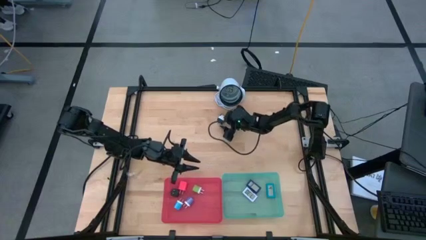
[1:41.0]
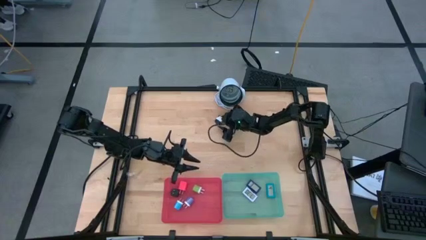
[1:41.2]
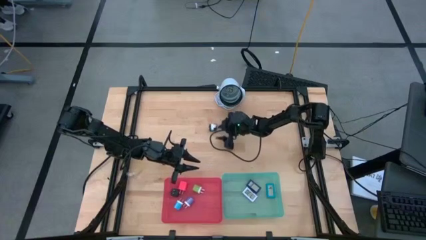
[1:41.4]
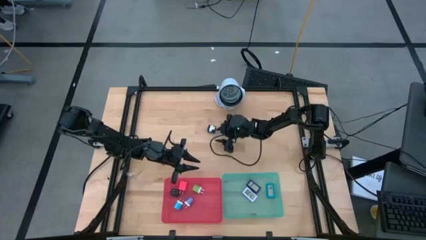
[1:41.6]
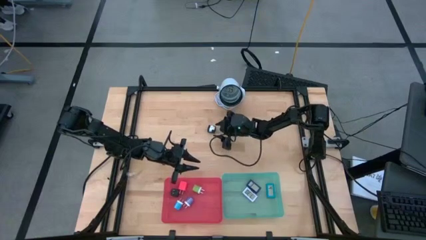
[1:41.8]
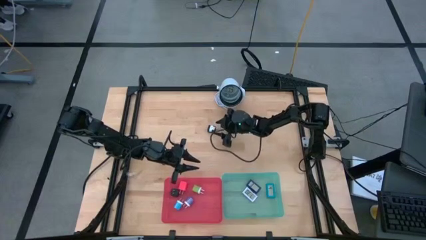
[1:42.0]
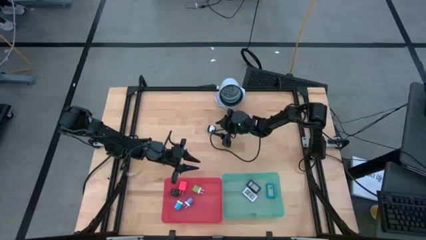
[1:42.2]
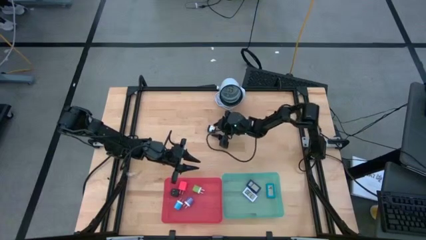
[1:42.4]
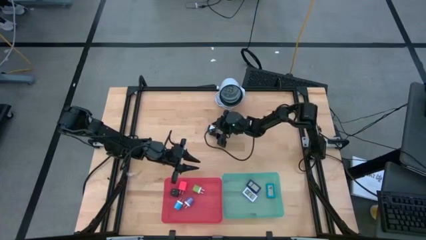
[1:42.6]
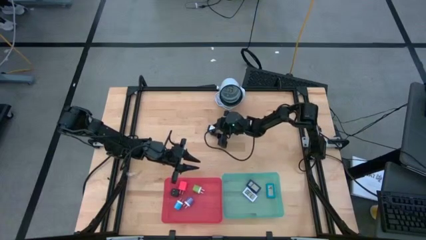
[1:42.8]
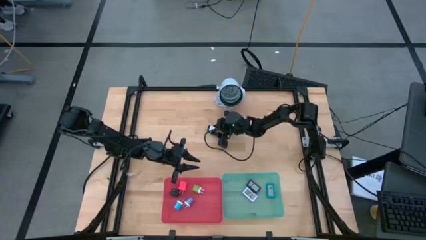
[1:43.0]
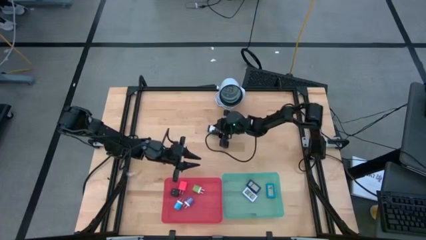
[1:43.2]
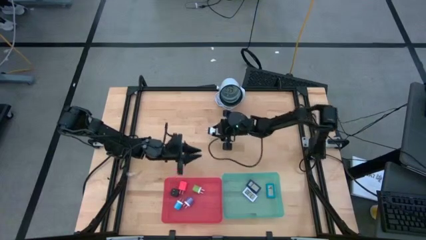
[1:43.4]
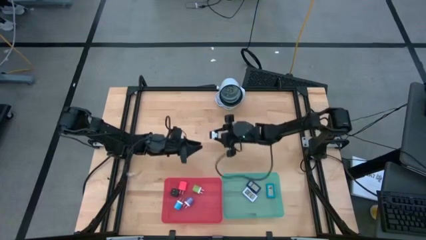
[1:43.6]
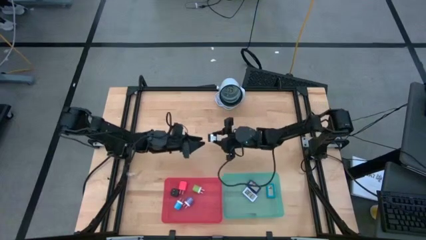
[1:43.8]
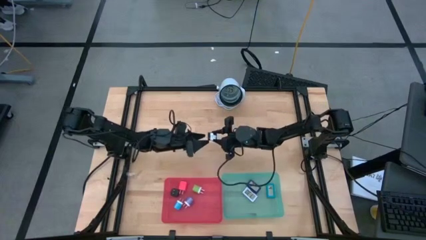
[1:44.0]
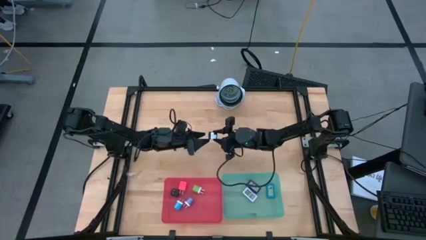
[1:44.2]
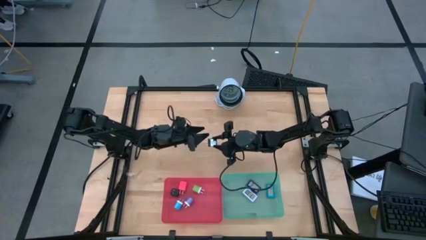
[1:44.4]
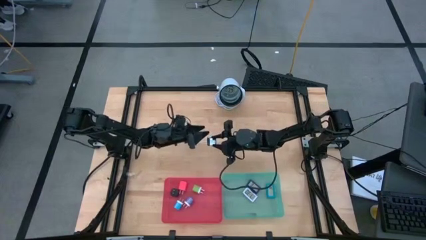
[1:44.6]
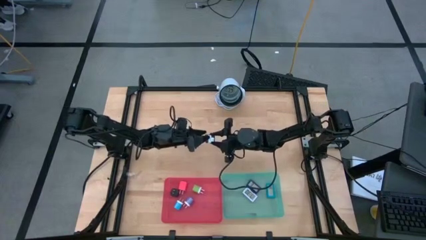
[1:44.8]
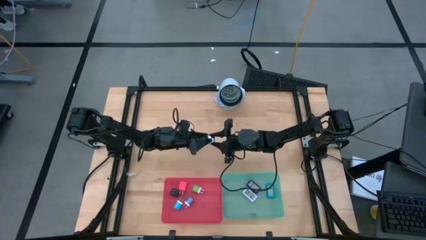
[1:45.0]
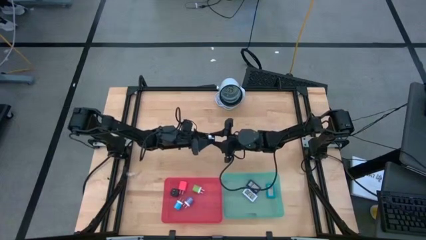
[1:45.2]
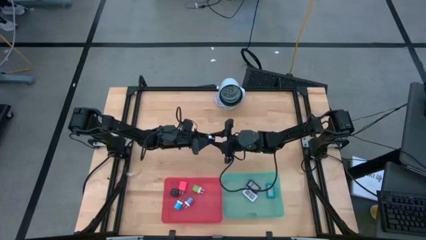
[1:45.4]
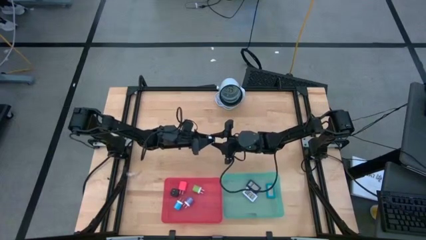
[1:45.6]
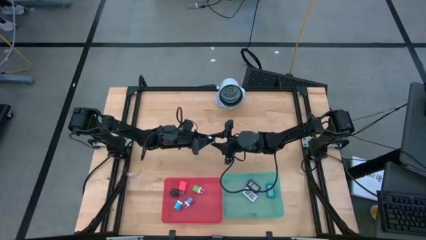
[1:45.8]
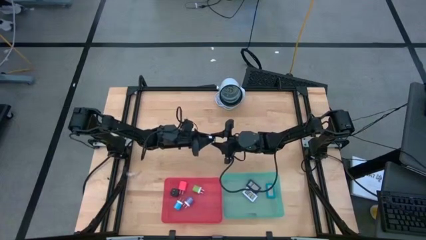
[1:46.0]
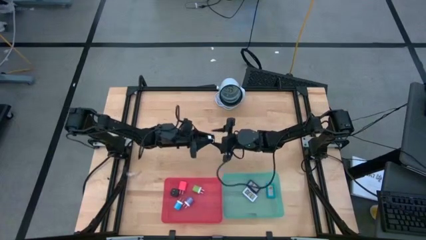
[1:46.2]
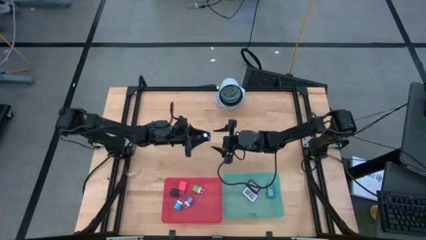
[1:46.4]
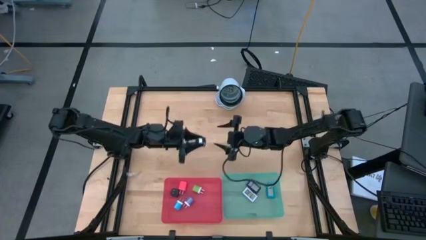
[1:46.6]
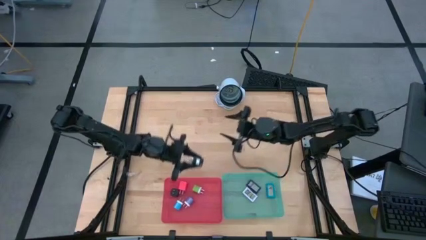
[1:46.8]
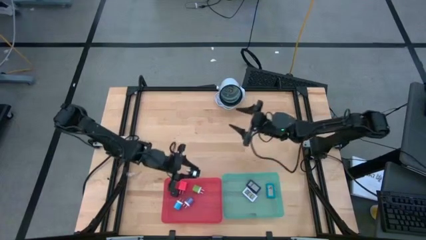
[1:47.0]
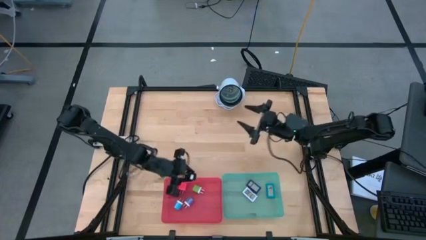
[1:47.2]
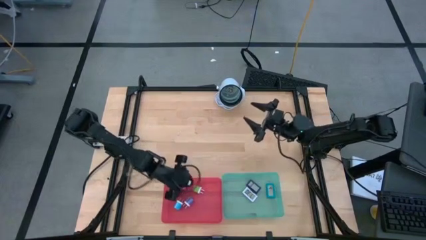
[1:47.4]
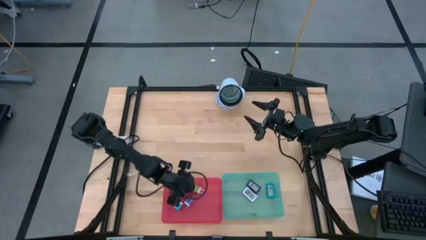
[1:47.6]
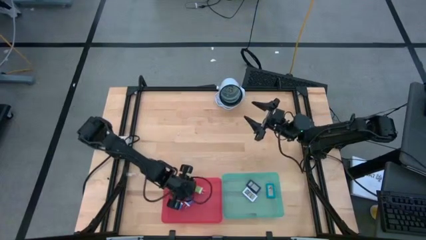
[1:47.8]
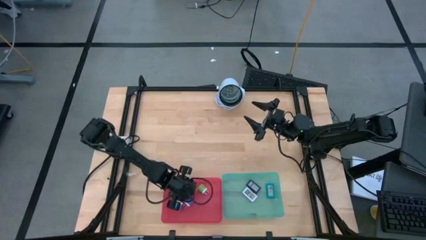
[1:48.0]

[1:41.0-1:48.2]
Task: Pick & Place Office items
Put the black charger adapter into the red bin

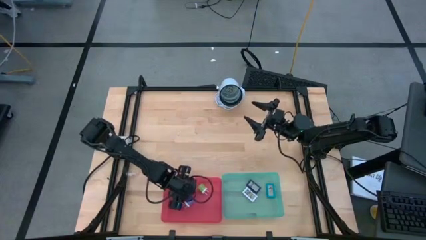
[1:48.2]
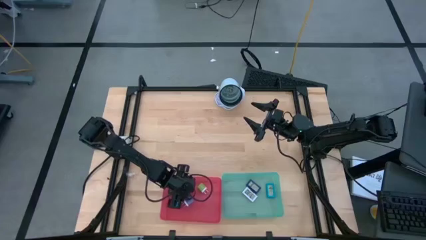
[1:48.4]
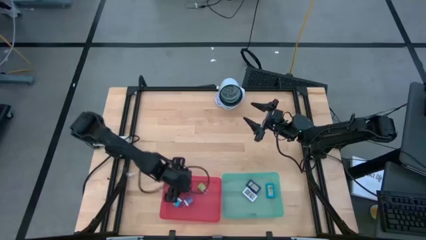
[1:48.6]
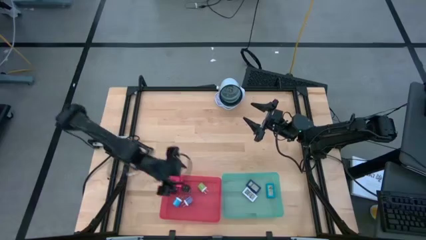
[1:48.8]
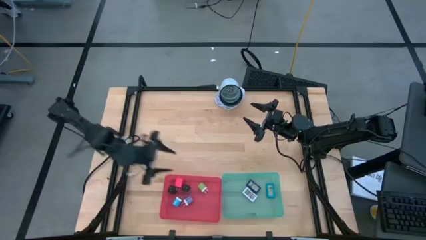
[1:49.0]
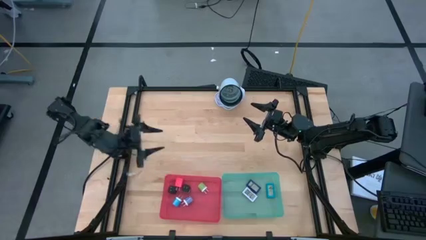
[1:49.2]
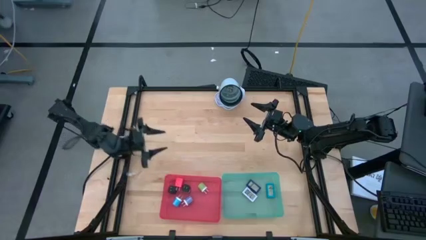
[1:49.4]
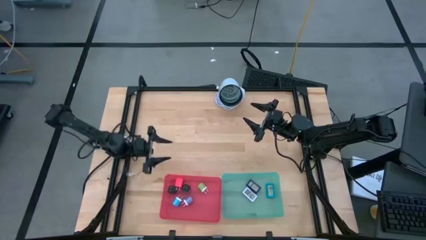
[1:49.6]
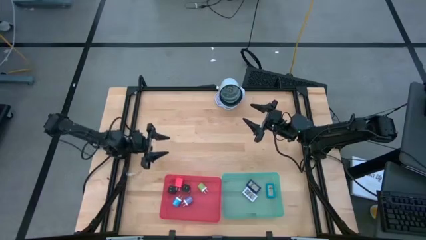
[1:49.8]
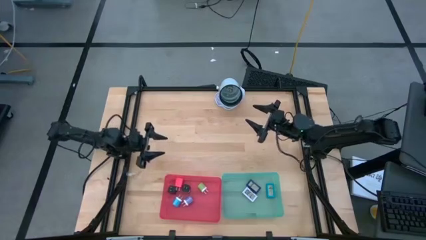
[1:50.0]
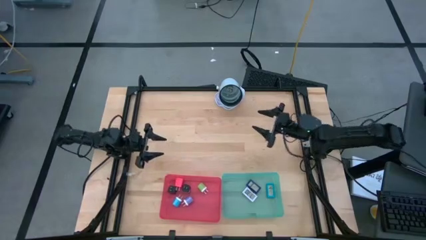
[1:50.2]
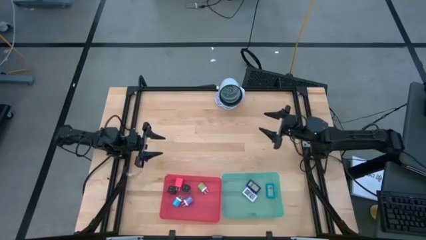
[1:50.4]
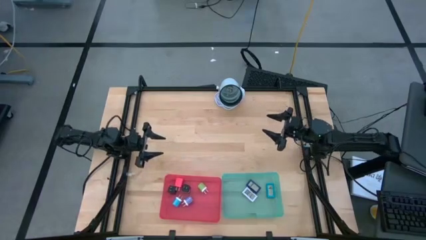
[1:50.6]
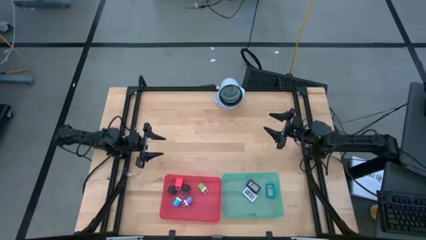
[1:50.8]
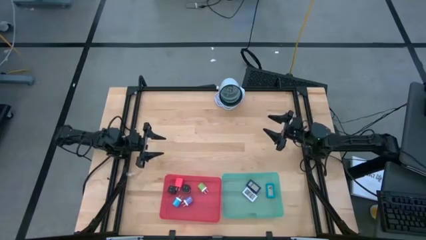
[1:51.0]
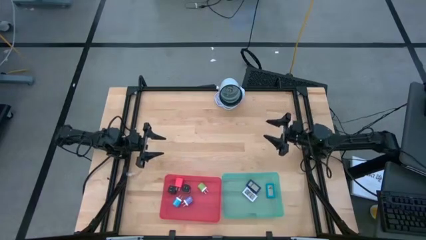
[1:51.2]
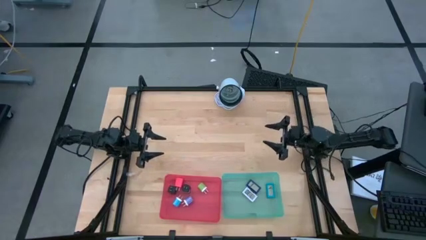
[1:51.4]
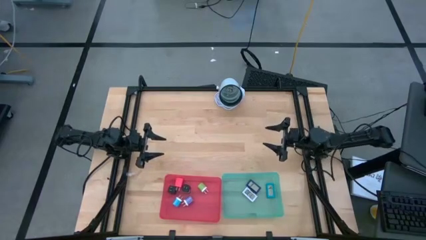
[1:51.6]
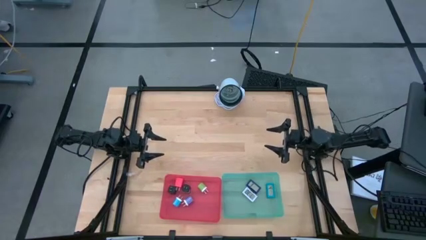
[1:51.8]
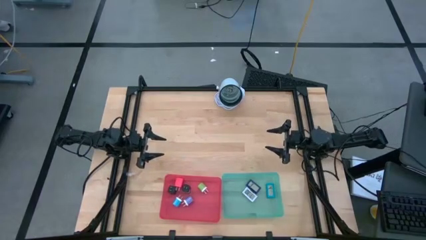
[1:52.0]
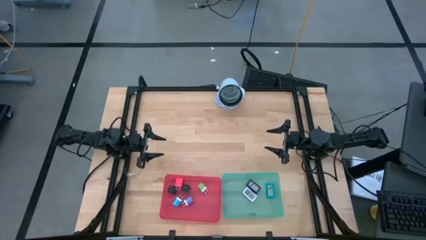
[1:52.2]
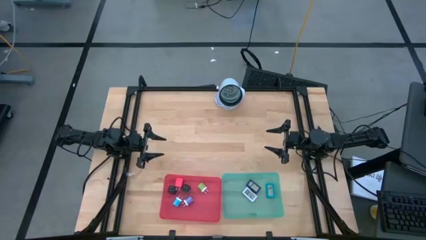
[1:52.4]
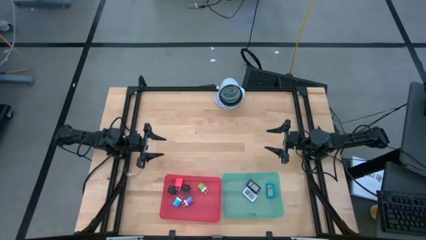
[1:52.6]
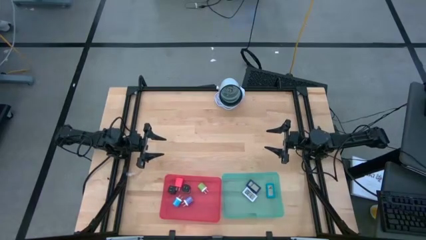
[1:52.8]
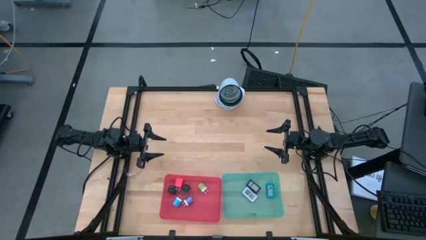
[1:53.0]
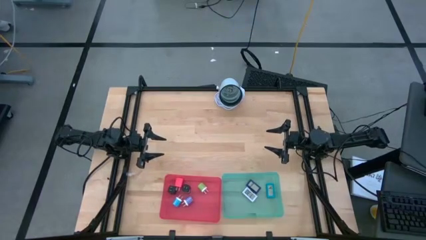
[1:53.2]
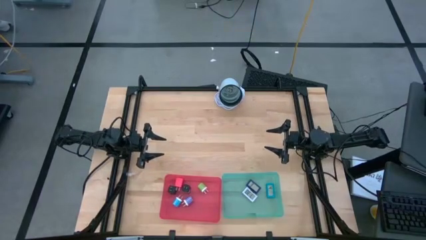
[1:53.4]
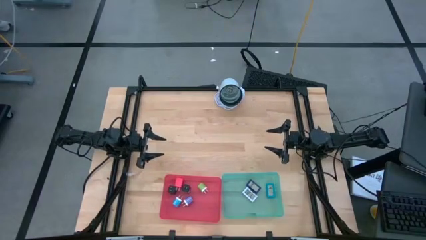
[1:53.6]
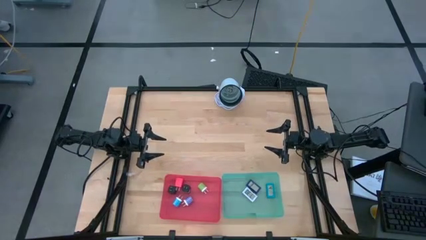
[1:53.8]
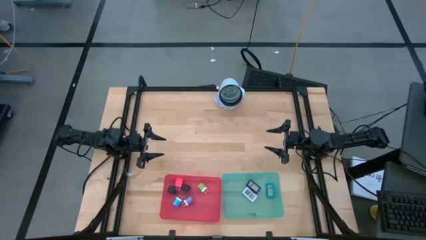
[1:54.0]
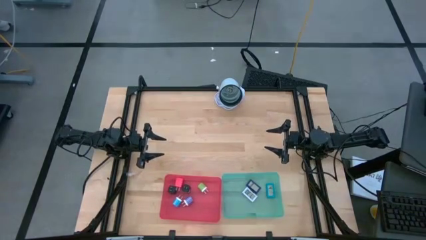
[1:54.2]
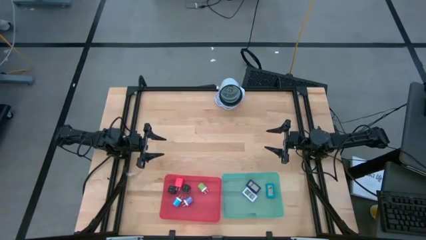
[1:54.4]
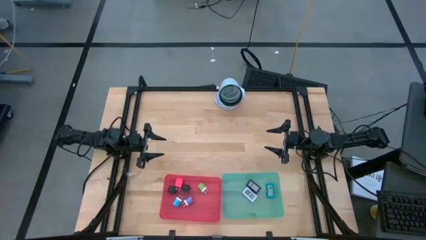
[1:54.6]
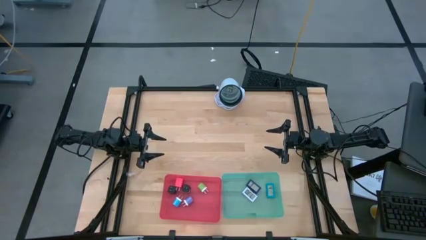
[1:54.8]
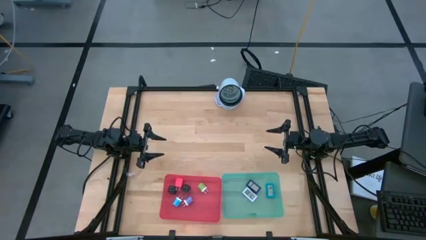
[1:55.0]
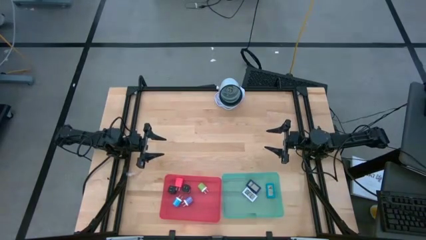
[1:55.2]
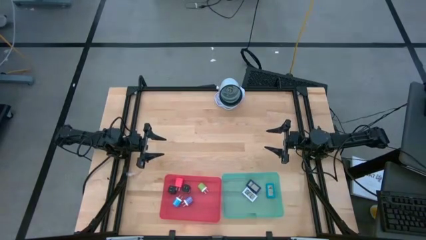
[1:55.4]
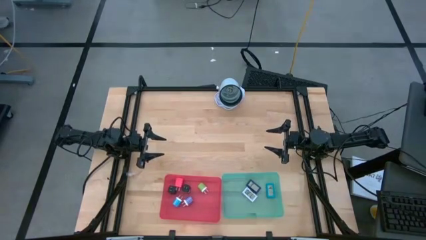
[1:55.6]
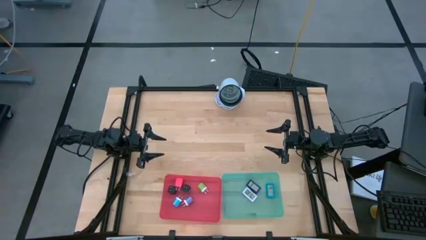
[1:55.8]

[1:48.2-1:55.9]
Return to Home Position
